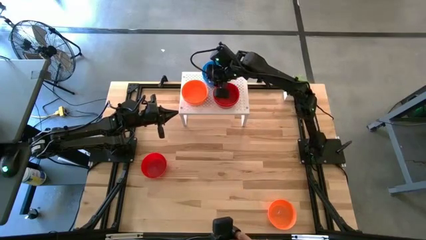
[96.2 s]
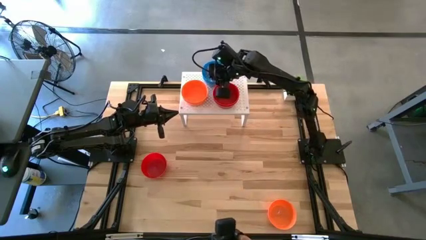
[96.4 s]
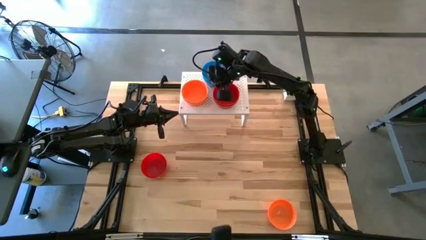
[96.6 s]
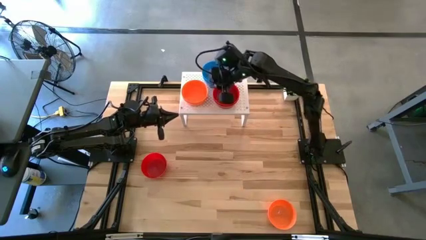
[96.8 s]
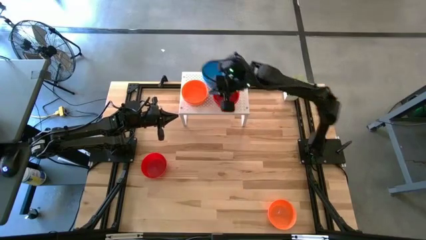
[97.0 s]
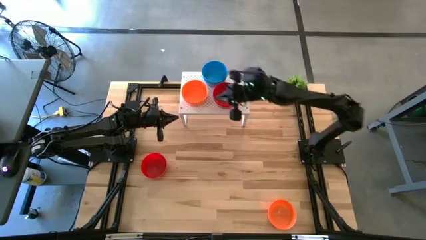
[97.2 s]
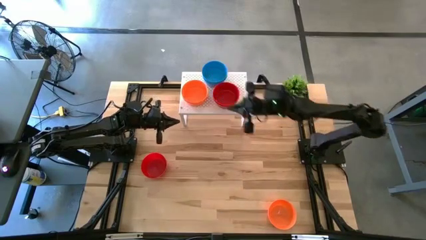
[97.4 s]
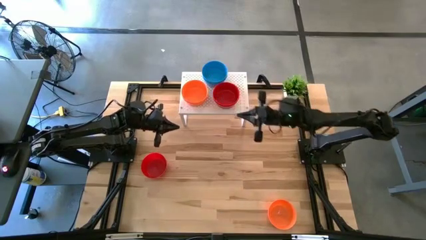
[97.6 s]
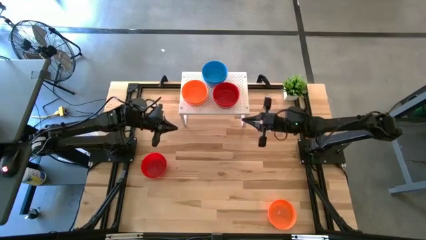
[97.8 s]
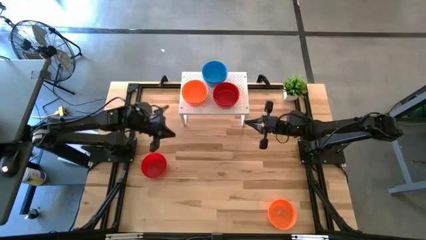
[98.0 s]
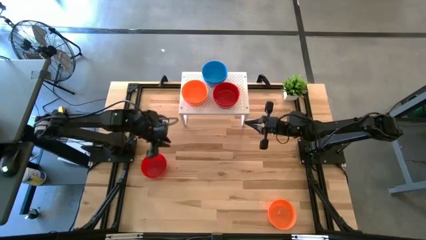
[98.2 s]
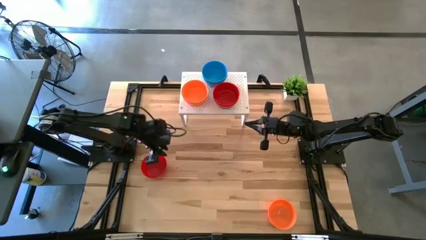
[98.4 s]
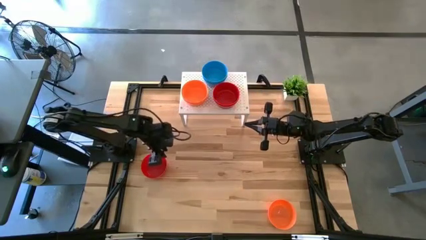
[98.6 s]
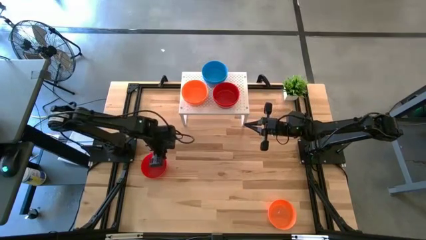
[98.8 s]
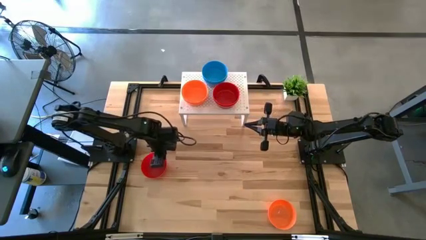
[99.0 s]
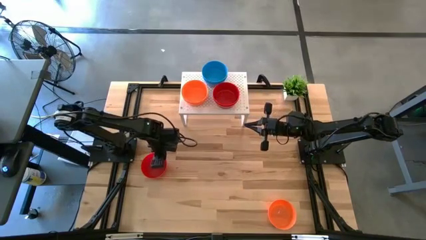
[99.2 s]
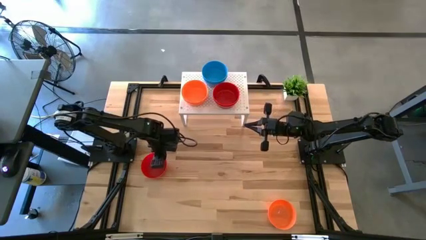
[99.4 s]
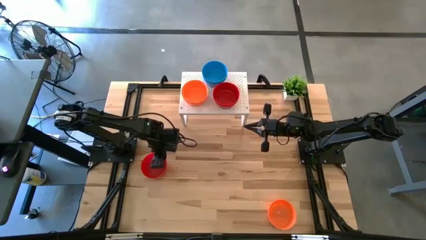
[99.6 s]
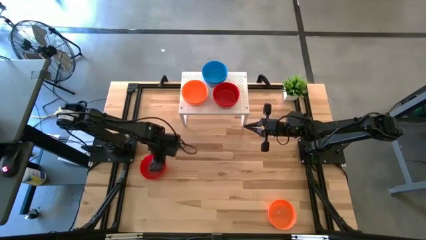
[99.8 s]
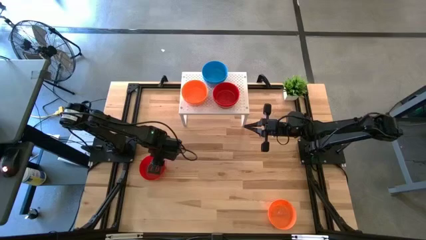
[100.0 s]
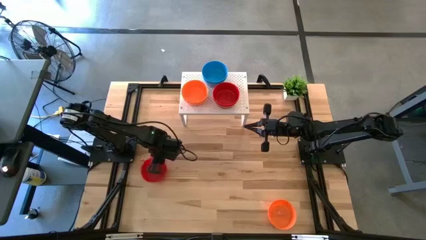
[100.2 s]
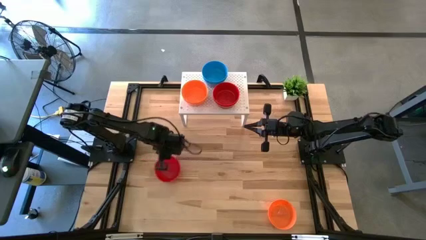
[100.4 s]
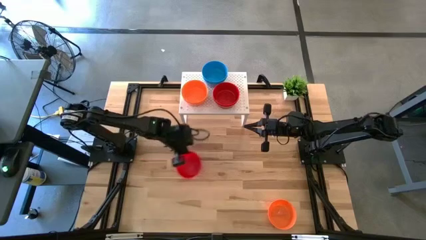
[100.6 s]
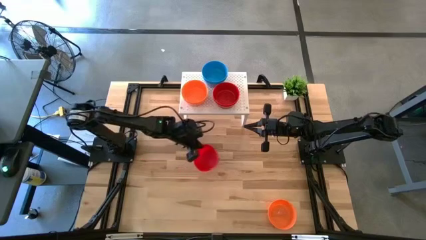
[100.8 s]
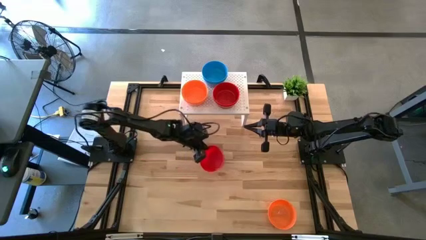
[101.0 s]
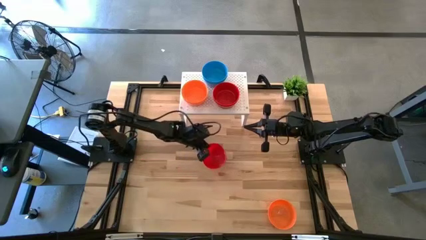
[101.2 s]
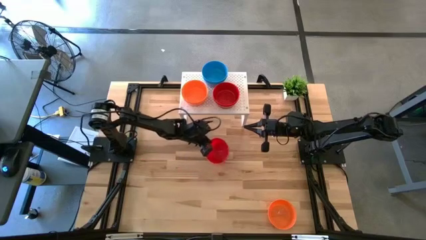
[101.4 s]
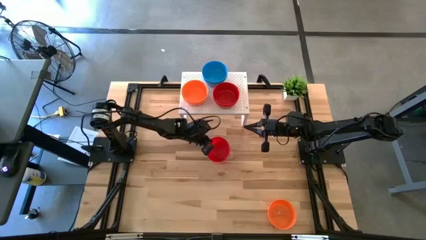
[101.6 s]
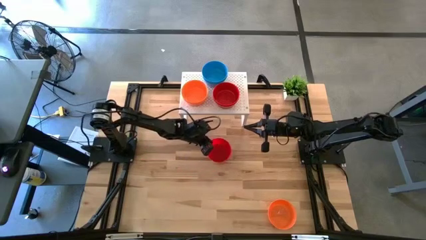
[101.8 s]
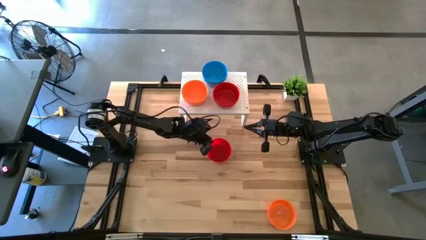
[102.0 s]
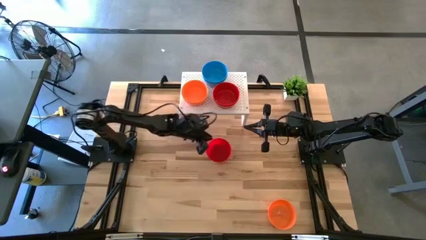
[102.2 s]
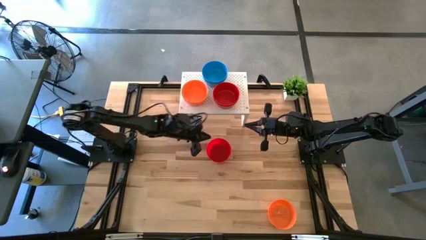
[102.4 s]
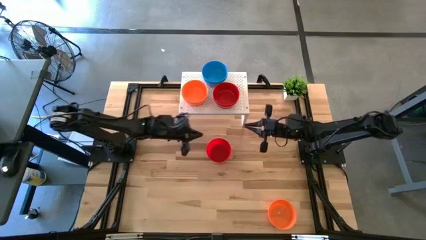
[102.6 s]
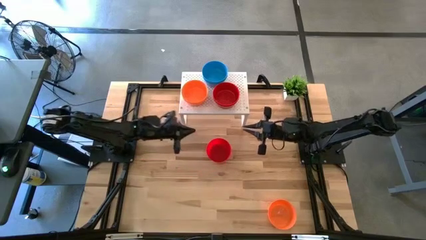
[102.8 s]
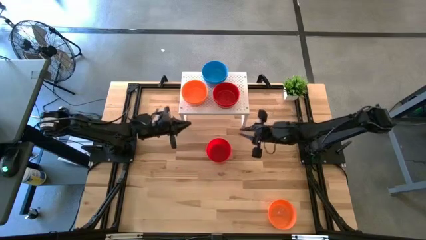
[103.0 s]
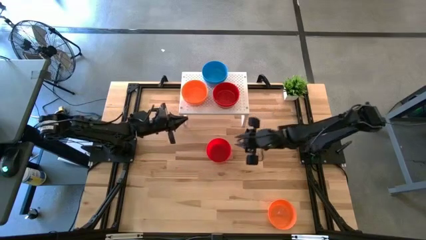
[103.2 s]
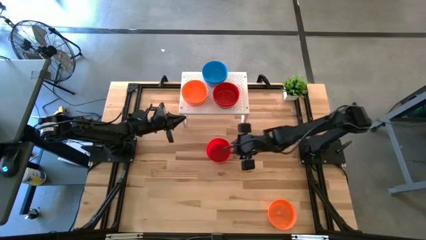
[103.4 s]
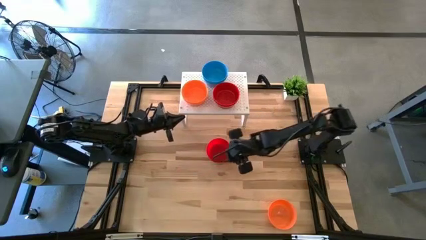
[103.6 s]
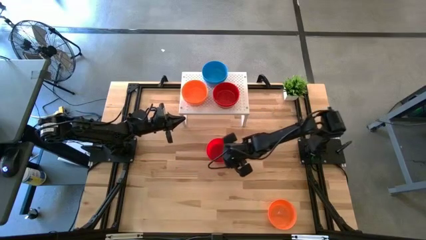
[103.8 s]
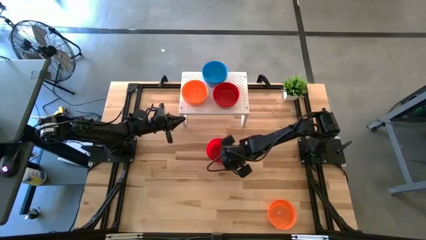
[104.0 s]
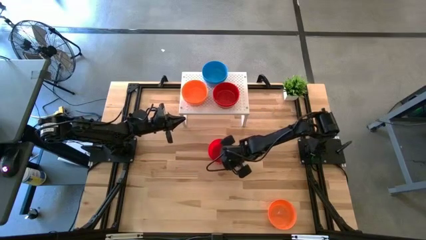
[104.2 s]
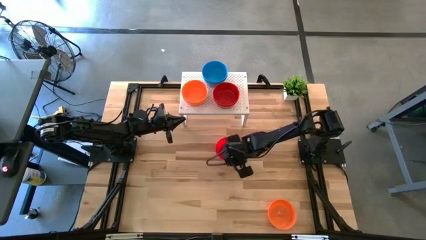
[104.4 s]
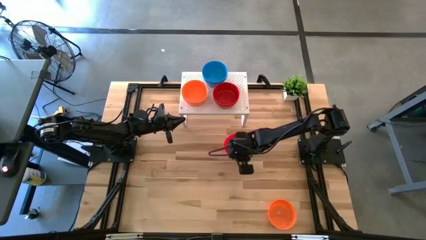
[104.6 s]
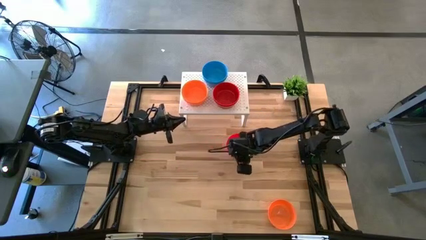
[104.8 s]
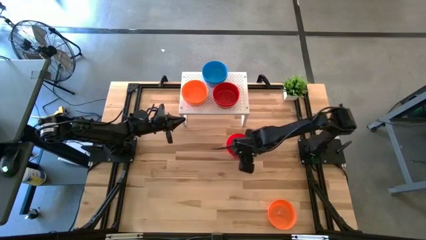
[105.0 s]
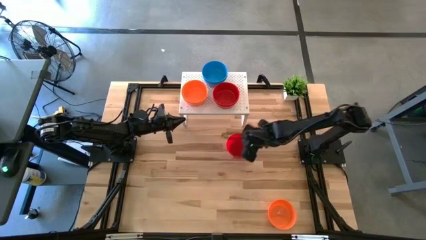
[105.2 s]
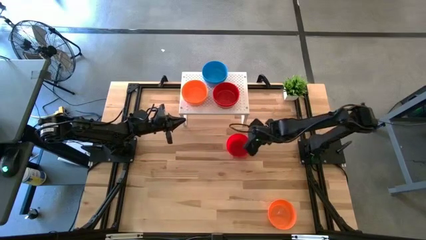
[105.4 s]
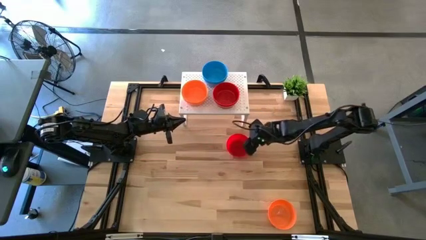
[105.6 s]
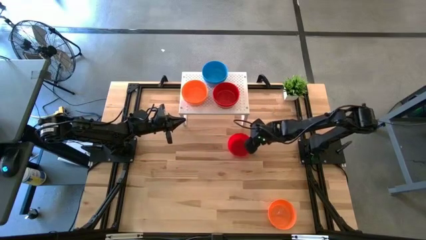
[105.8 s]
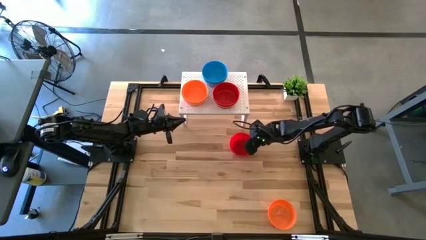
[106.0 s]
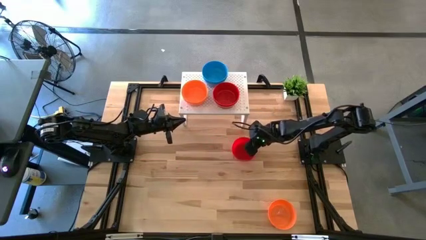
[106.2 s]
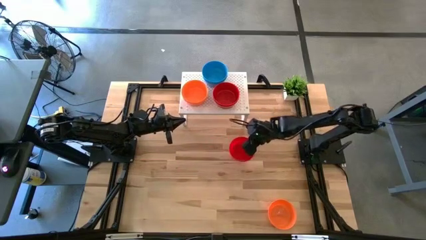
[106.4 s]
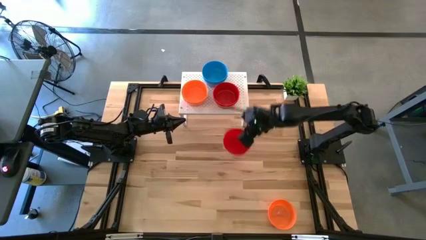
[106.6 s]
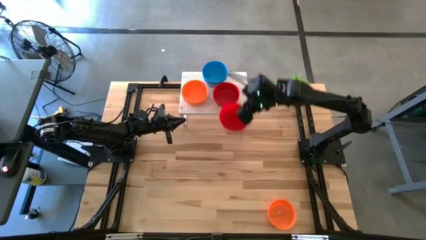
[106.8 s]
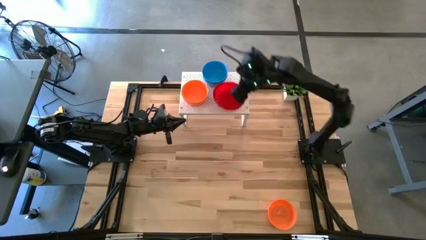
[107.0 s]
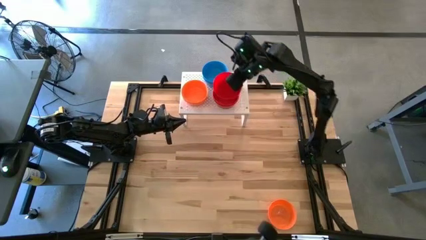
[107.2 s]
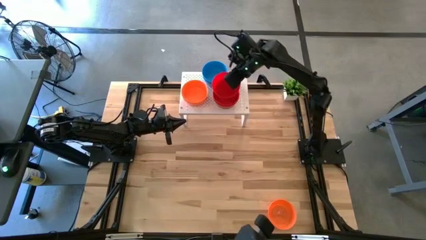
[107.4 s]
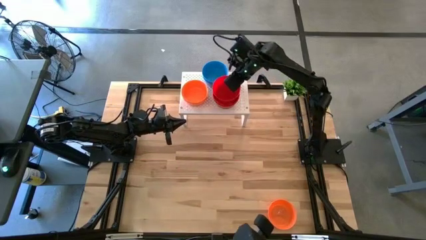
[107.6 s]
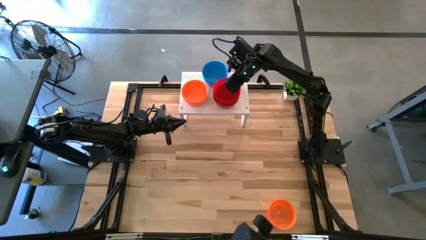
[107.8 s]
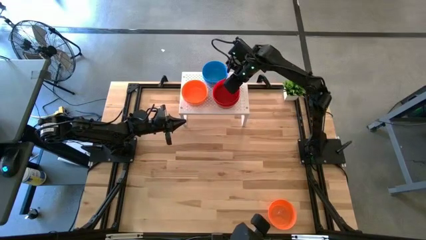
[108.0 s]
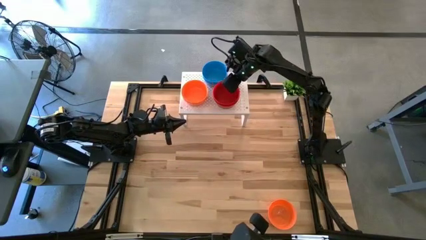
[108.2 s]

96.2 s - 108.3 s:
Task: Pick & Place Mini bowls
Stack the red bowl on the red bowl on the shelf

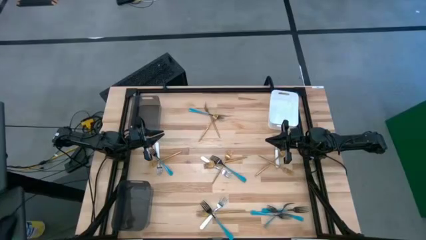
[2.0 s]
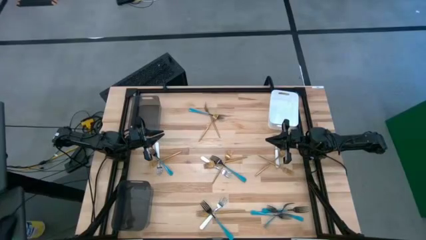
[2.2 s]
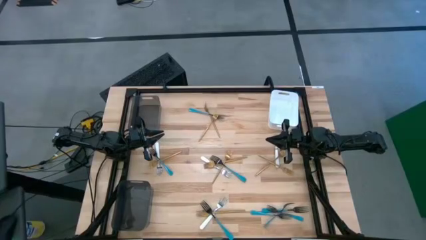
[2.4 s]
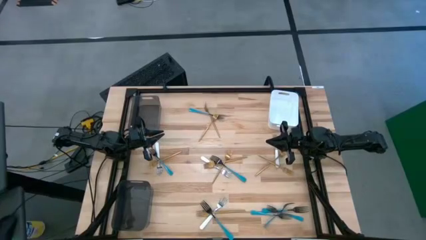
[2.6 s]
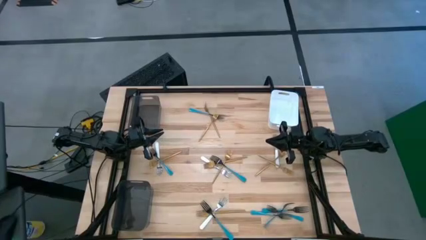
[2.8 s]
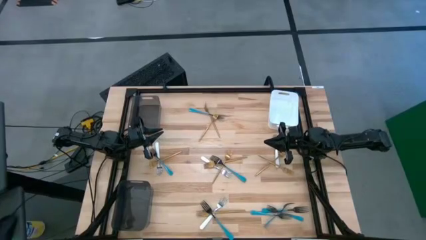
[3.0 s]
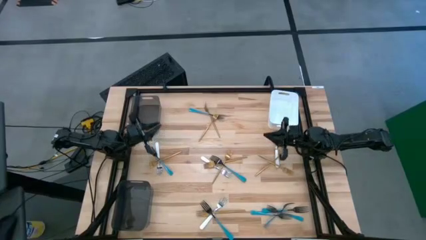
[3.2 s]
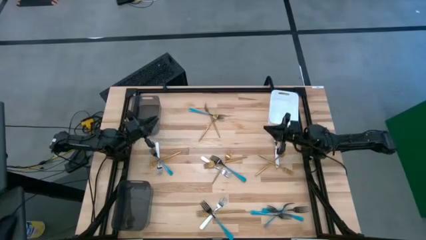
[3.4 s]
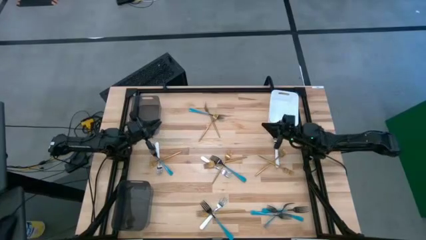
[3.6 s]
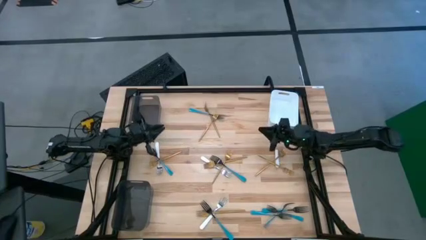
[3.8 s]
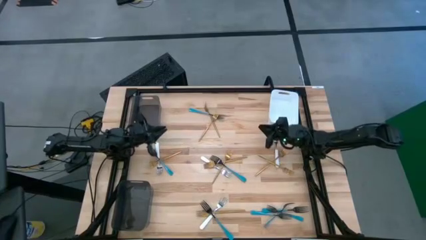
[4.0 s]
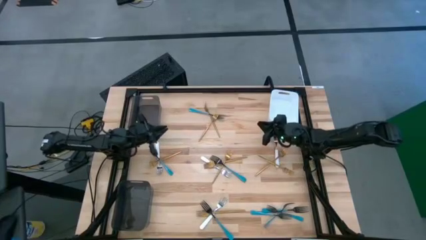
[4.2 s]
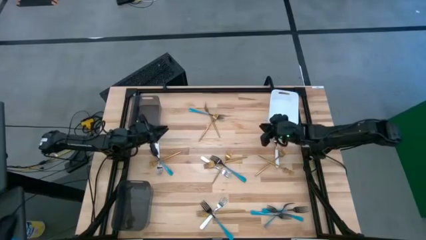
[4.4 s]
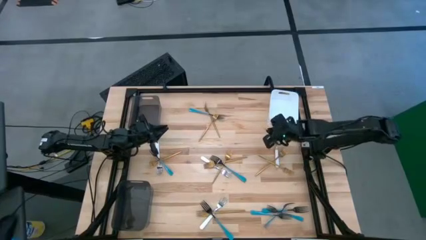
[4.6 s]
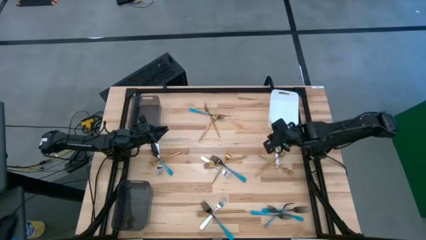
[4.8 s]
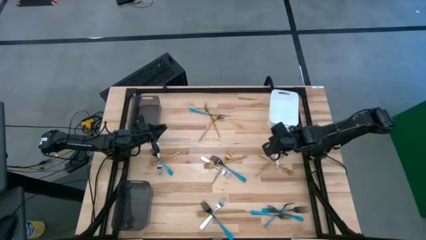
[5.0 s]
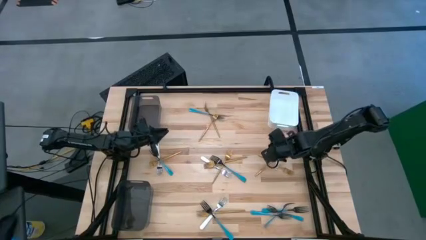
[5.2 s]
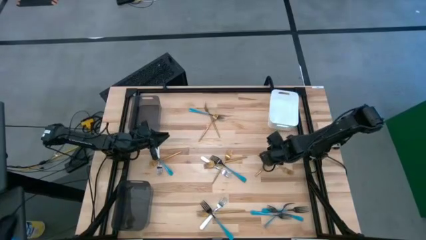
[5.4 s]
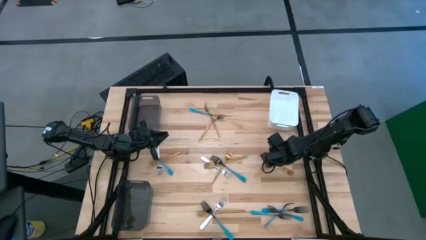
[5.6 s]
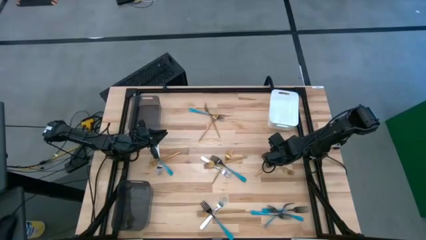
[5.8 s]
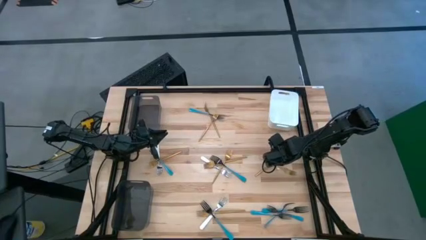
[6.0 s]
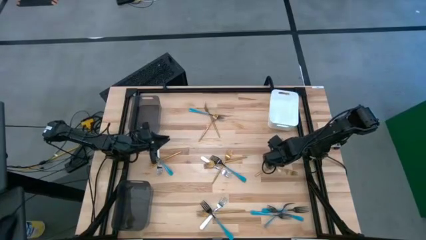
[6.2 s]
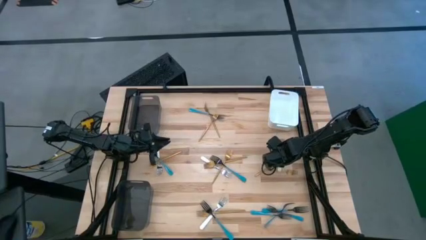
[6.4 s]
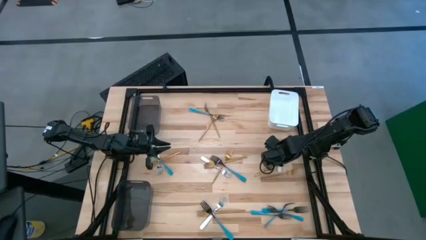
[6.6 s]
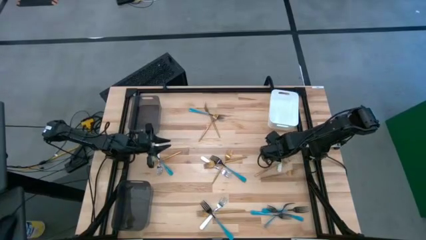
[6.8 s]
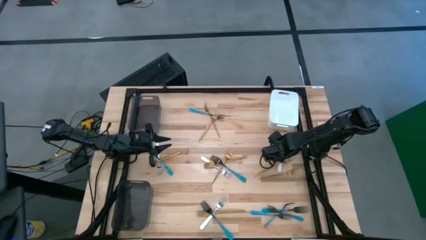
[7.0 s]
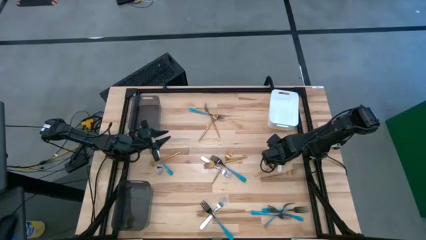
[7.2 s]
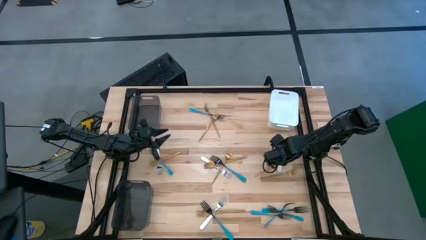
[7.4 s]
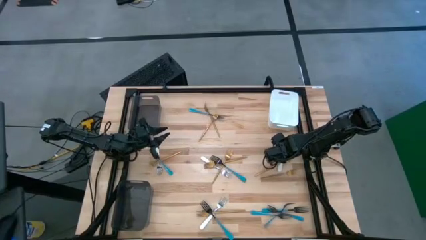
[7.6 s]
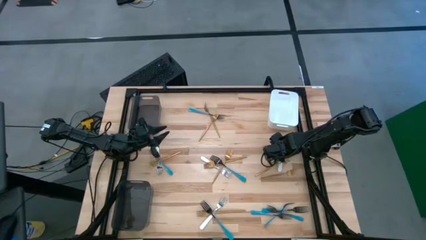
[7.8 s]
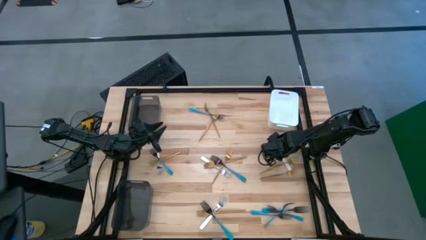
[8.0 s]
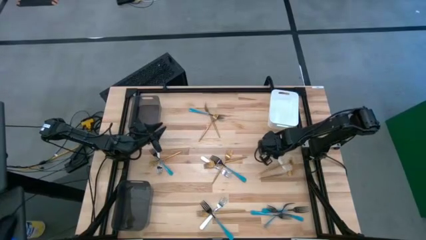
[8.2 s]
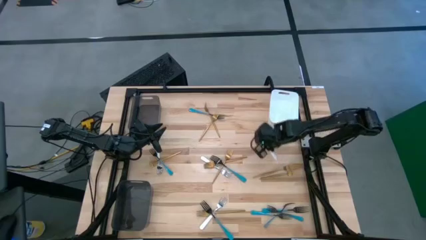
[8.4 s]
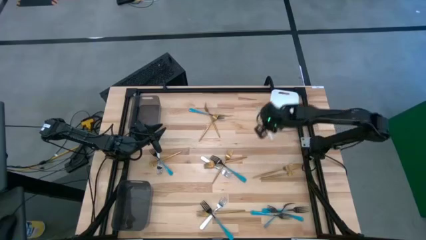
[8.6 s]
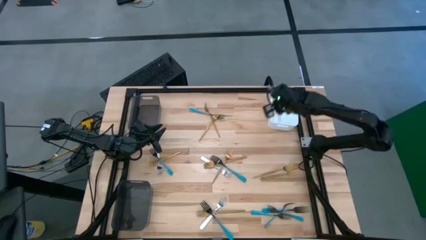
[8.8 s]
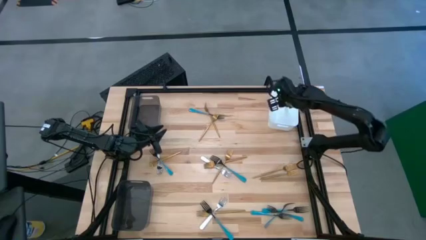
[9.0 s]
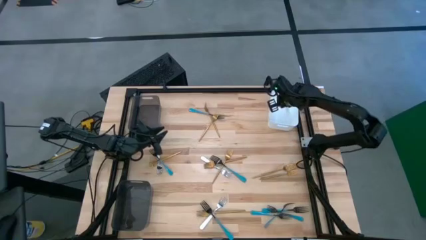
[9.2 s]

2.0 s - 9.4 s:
Task: Sort silverware by color (type)
Put the white fork into the white bin
